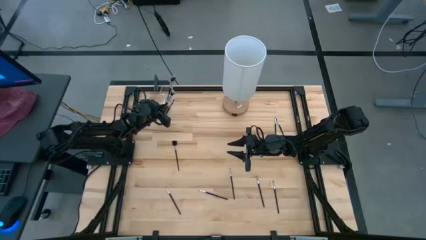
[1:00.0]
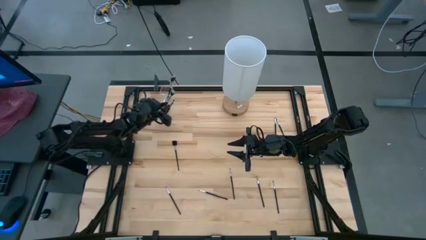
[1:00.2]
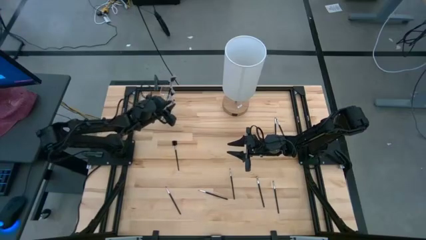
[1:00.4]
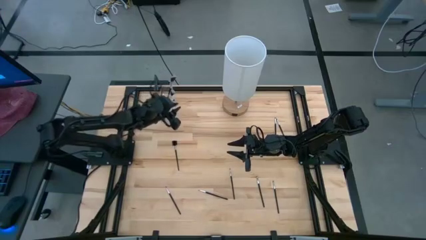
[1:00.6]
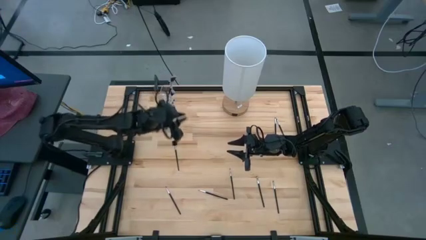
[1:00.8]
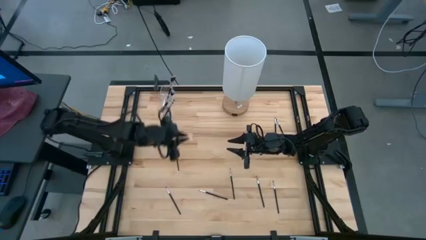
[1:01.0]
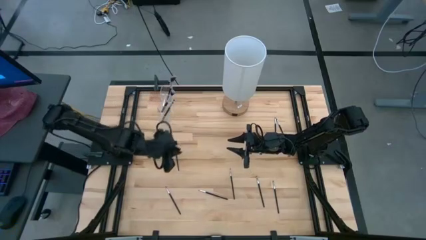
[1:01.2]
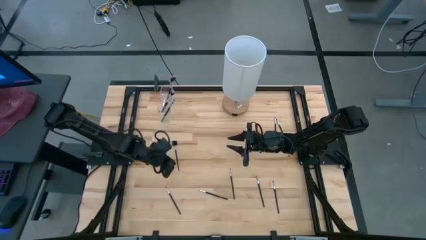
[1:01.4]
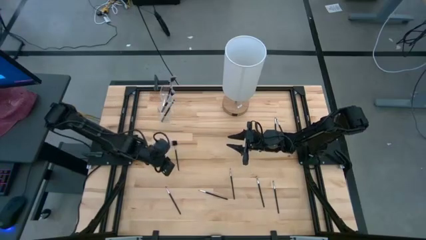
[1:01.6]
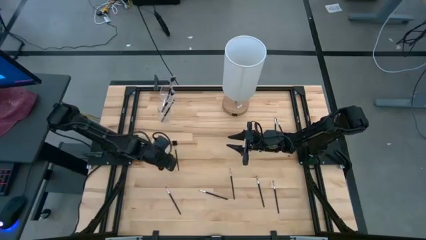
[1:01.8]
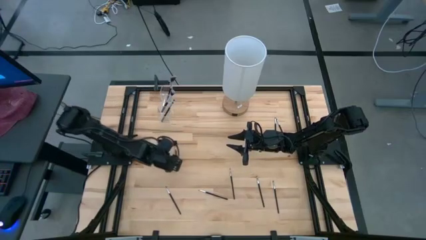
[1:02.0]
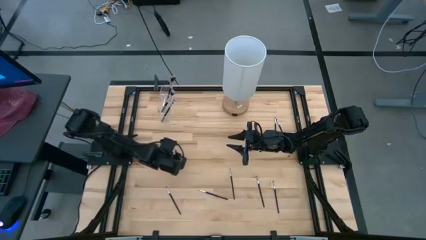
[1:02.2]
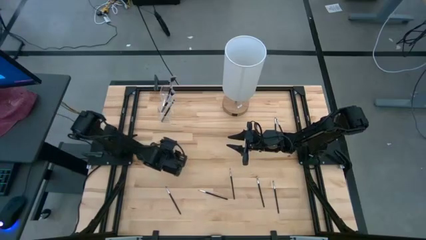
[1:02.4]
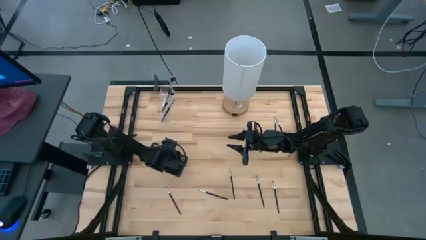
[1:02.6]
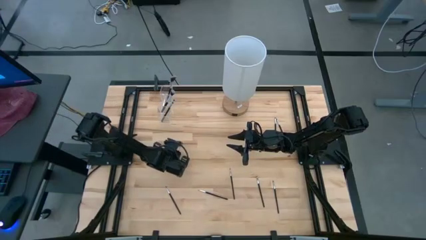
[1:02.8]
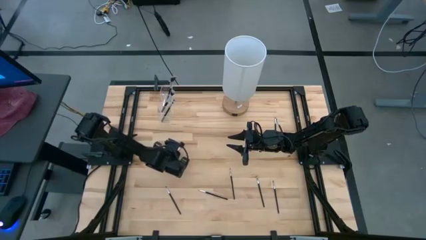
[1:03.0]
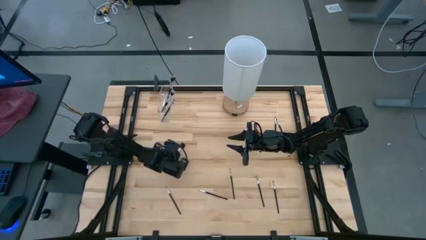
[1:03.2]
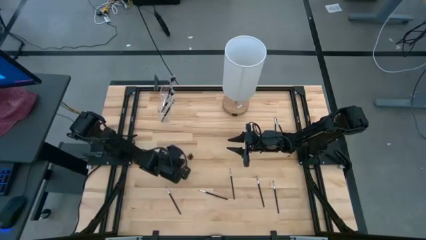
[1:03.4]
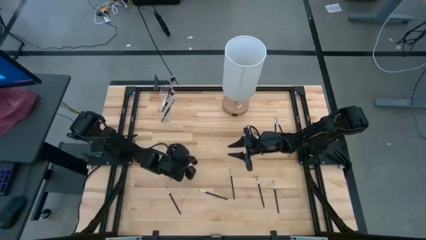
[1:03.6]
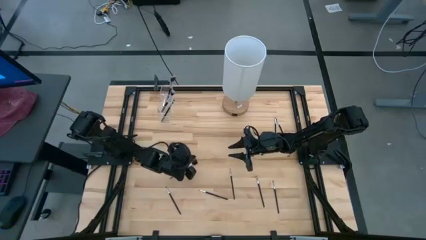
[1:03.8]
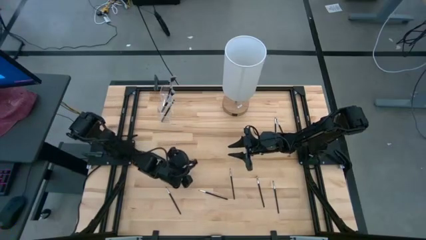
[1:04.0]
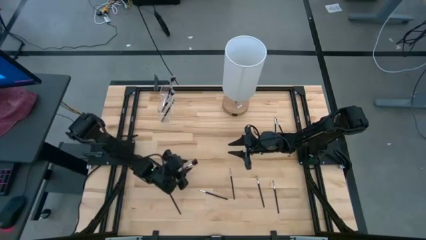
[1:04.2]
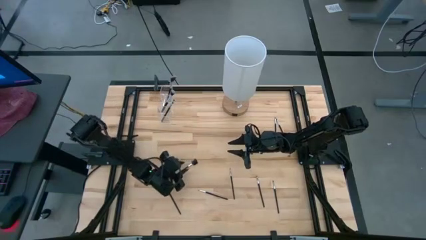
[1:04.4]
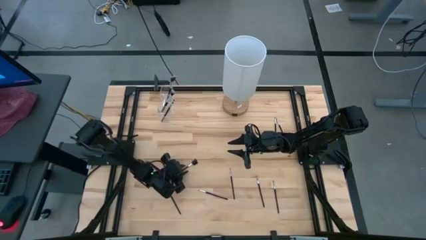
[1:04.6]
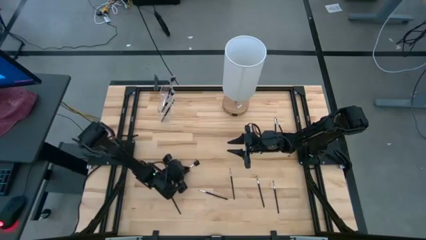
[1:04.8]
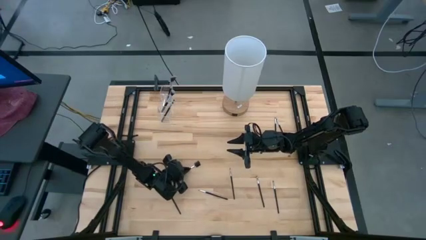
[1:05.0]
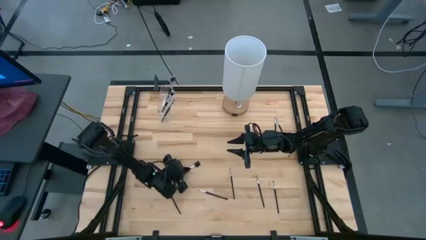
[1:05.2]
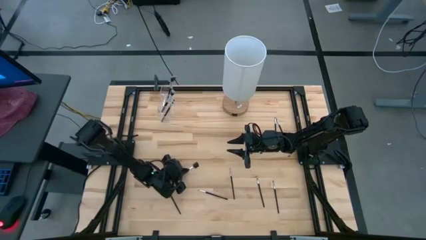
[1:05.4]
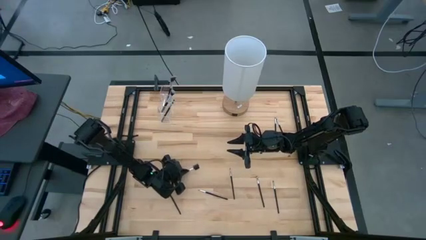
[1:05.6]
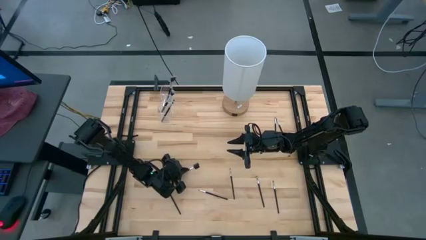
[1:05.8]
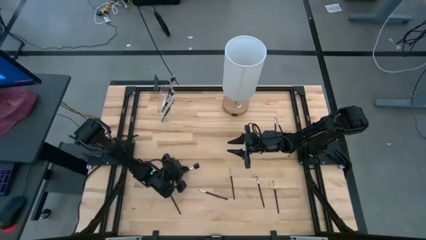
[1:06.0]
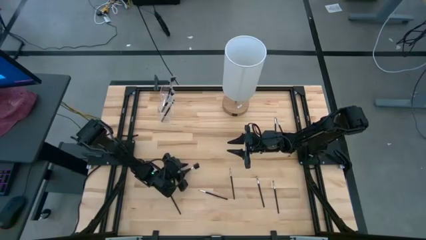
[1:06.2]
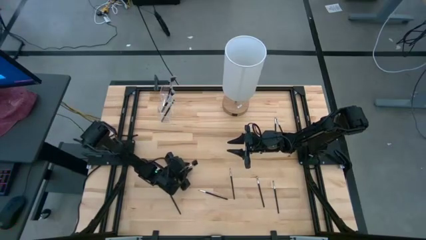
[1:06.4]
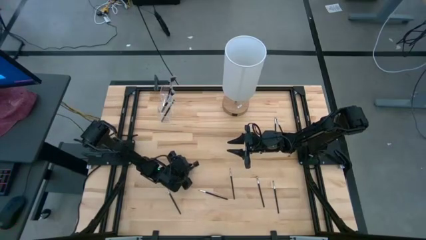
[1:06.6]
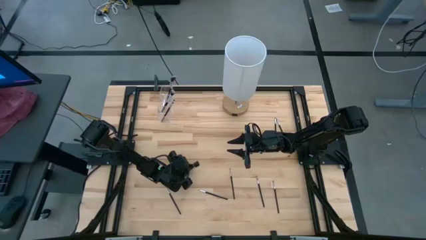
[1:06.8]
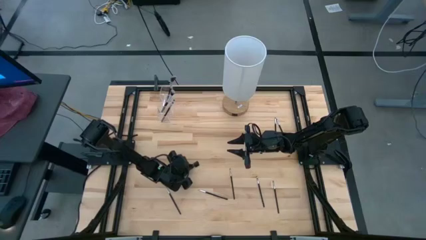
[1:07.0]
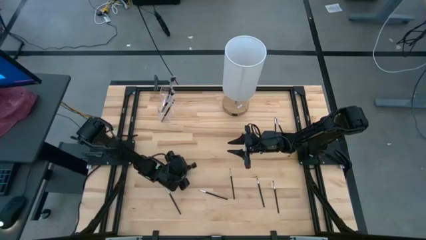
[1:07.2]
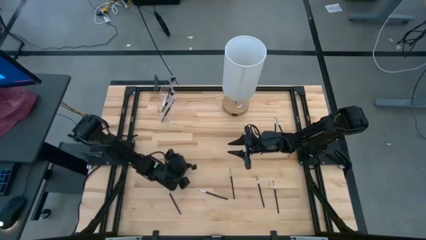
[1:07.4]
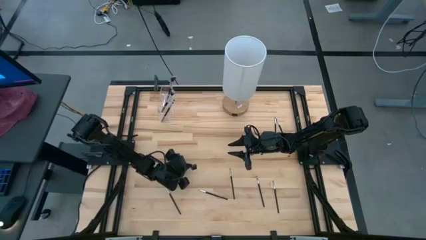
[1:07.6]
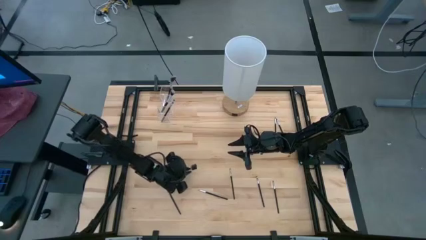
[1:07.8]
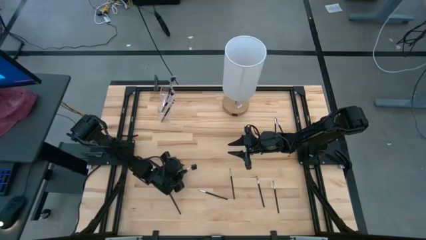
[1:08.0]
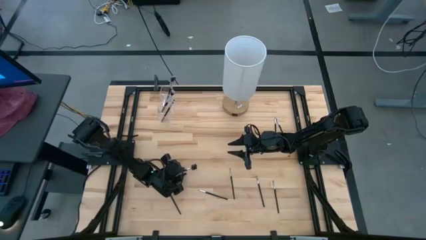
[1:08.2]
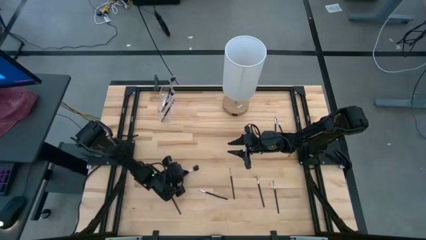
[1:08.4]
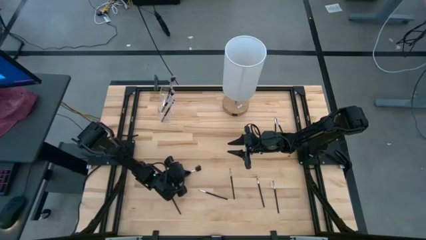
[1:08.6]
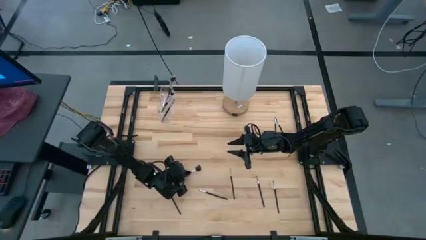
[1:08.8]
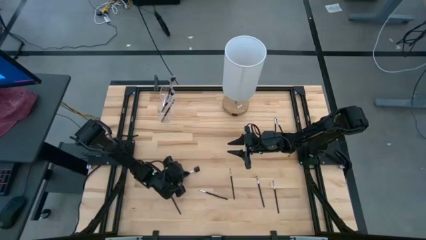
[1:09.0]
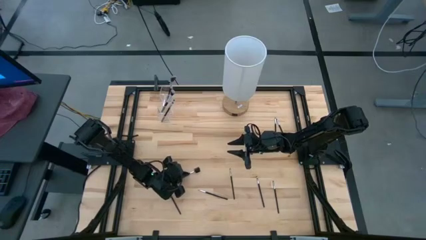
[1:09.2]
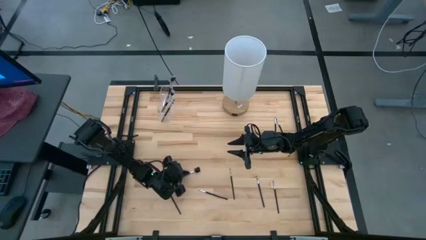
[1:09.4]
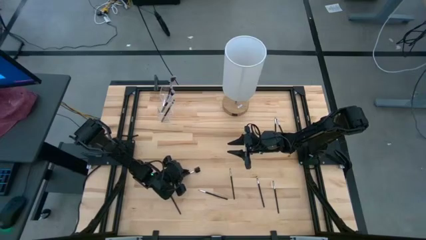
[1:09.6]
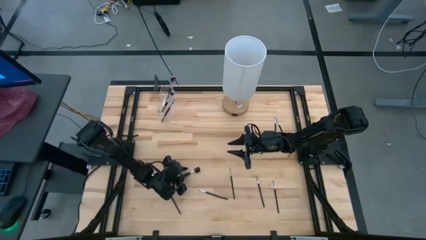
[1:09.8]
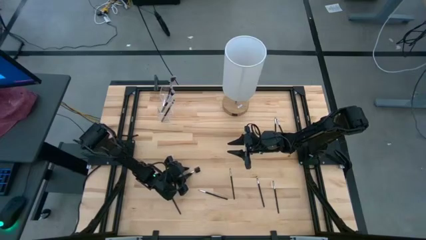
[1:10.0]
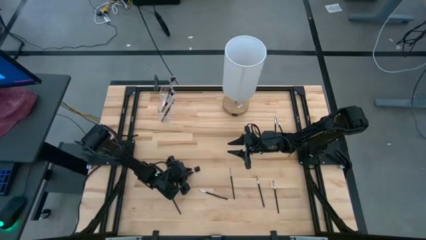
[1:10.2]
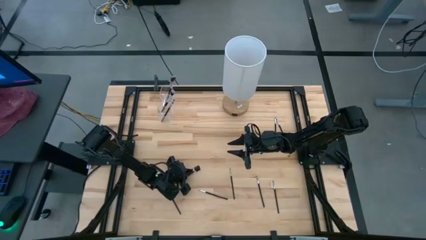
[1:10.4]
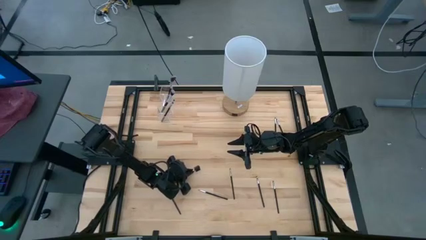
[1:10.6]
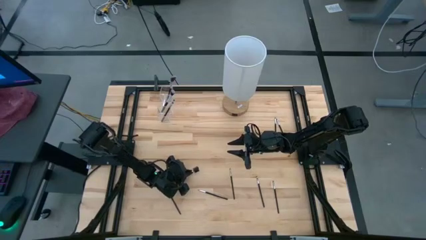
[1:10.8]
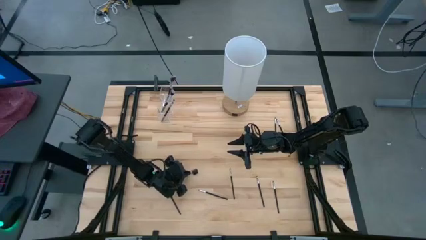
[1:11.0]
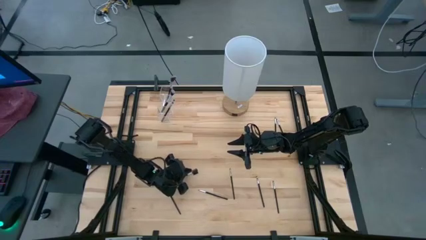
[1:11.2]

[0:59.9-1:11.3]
Task: Put items in baskets/containers
Put the black brow brush into the transparent organizer

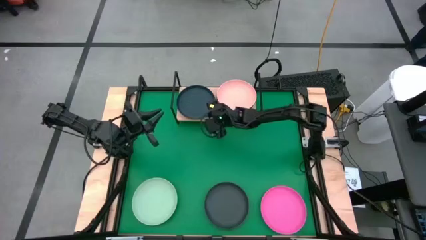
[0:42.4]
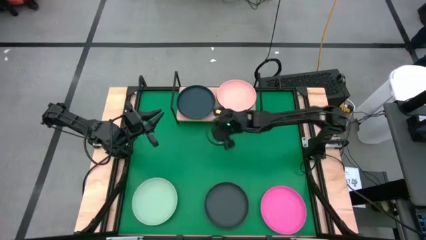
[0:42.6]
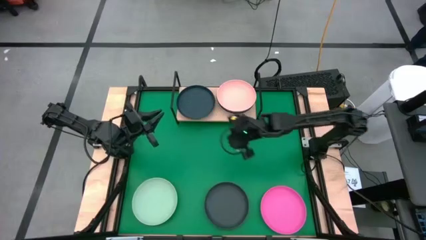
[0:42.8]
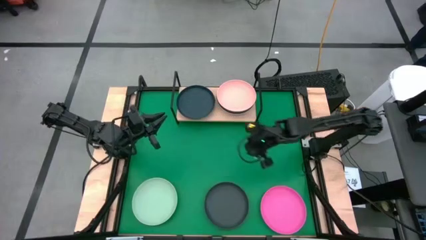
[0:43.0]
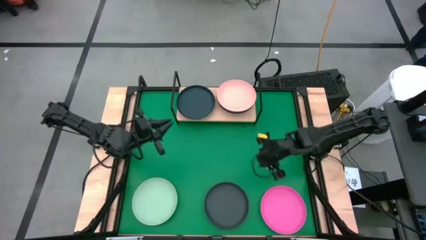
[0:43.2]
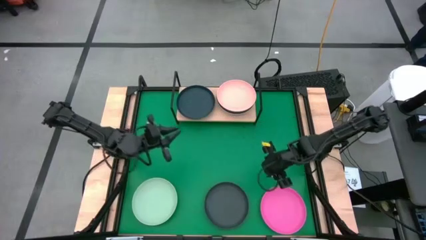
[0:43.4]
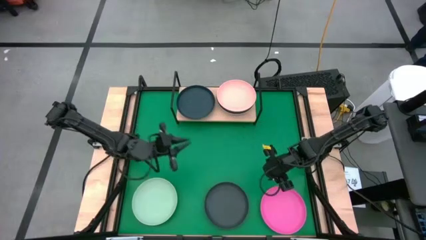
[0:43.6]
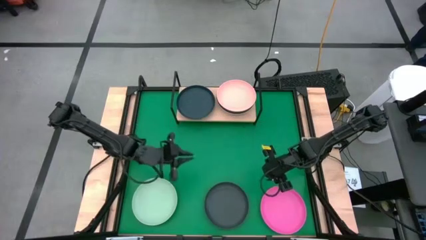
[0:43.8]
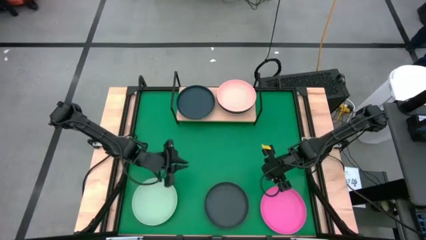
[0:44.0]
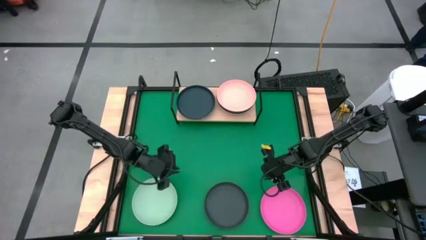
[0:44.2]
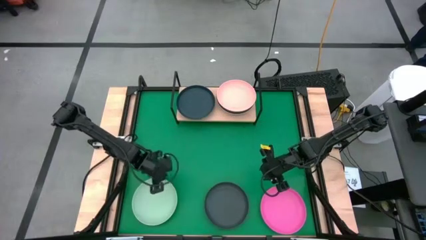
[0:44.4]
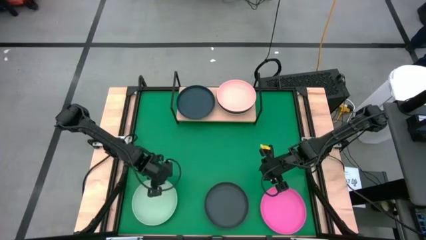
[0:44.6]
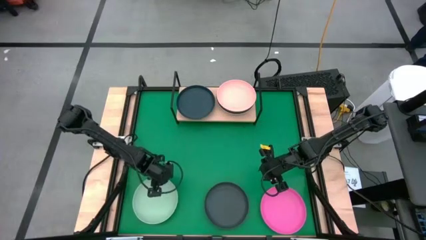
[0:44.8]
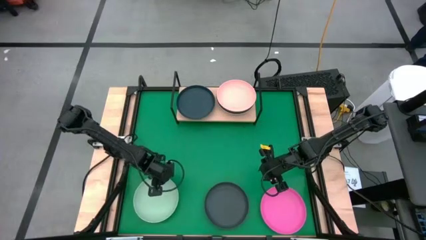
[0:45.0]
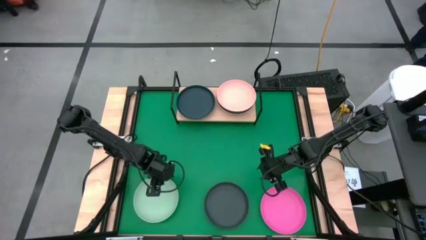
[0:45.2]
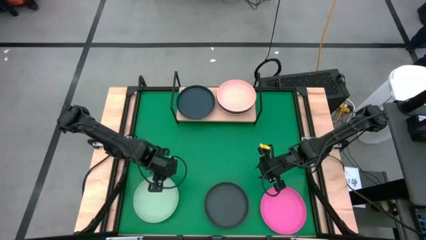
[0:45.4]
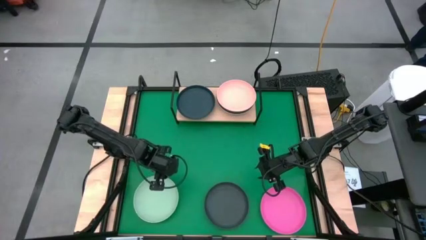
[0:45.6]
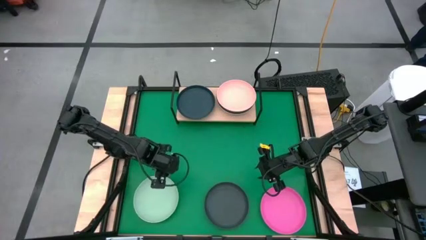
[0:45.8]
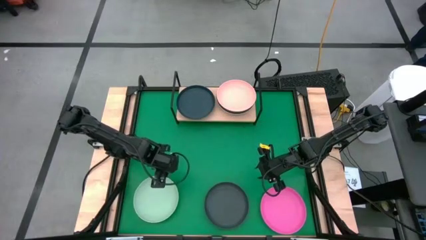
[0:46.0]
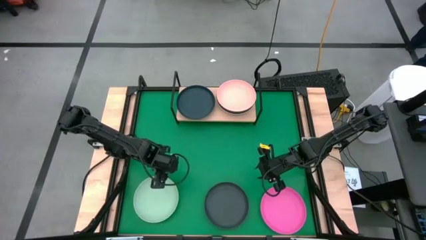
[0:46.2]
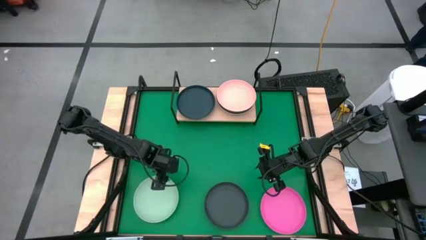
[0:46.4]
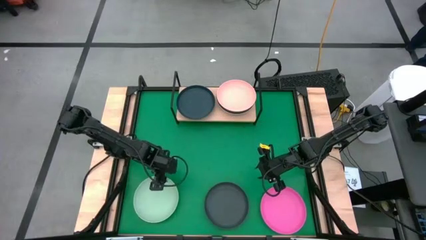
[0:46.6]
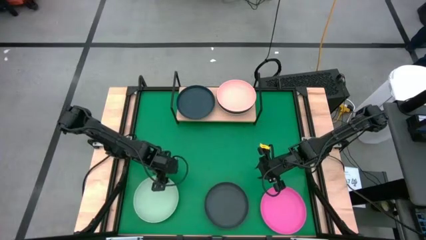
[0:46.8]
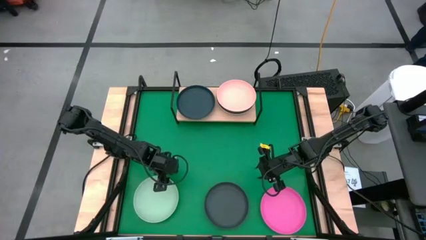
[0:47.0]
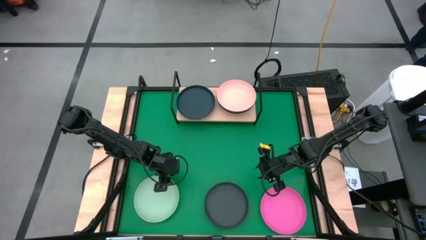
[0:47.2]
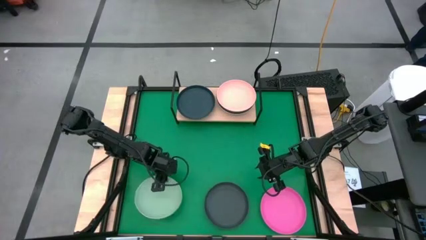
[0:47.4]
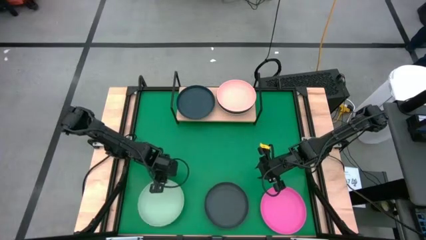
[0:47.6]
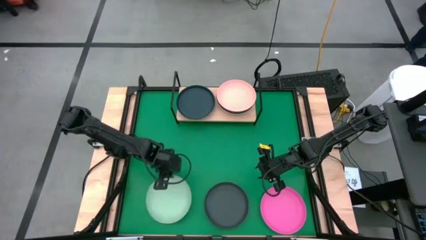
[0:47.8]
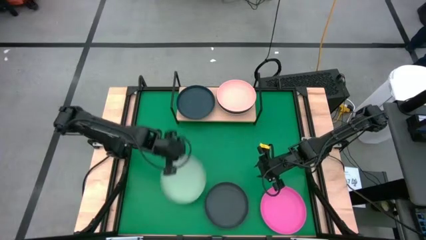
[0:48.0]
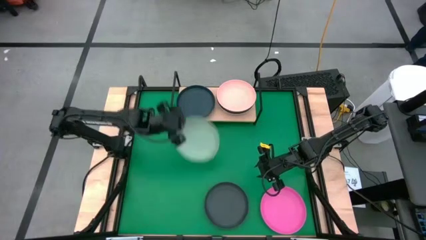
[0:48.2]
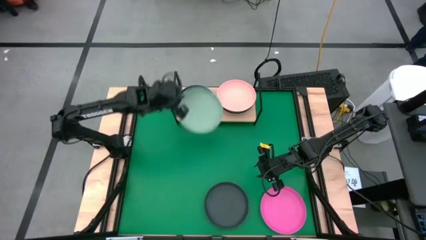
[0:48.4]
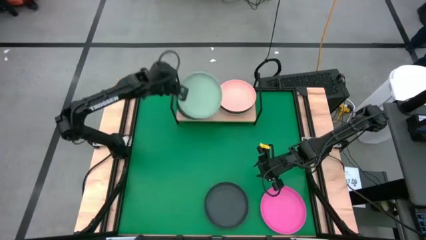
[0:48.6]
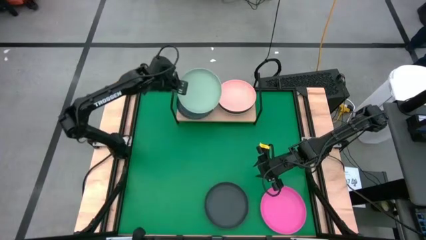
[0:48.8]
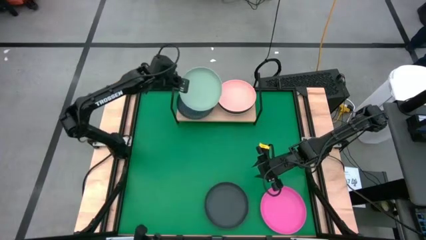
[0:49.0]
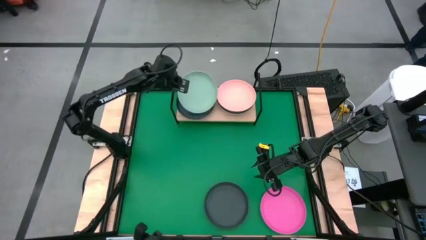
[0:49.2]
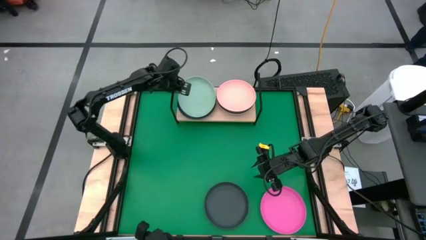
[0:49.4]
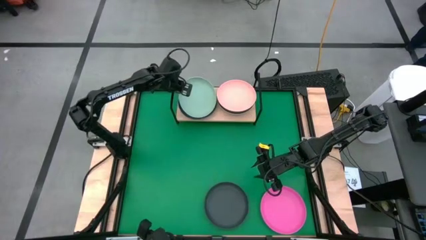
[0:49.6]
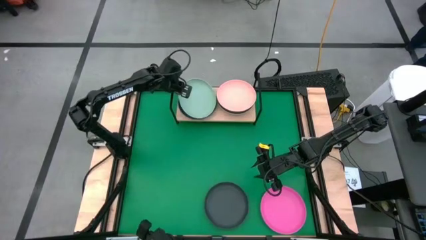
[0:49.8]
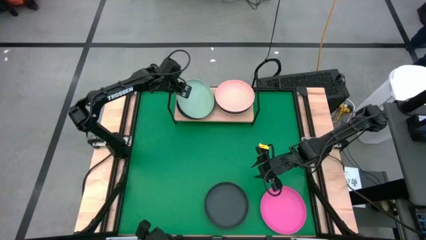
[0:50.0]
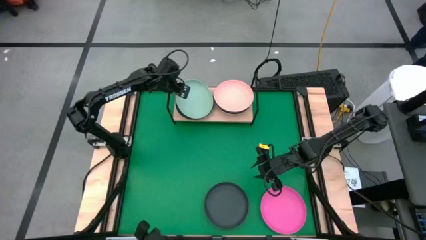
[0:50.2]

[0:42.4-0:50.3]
Task: Place and stack plates onto a shelf
Stack the gray plate on top of the dark green plate on the shelf
